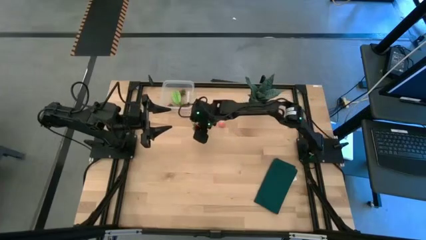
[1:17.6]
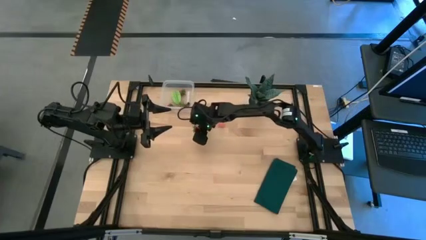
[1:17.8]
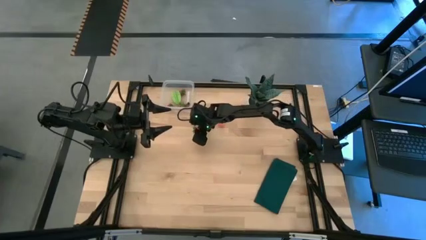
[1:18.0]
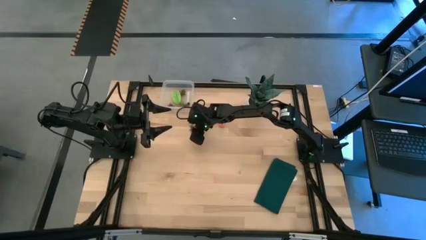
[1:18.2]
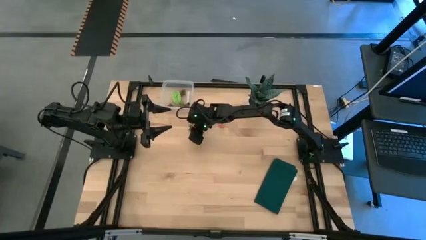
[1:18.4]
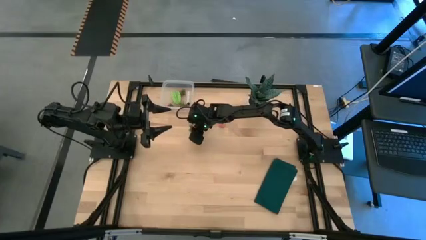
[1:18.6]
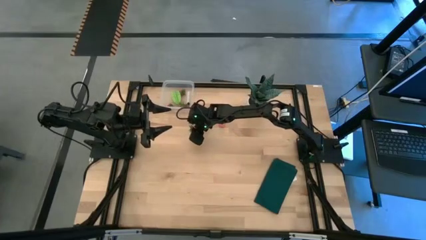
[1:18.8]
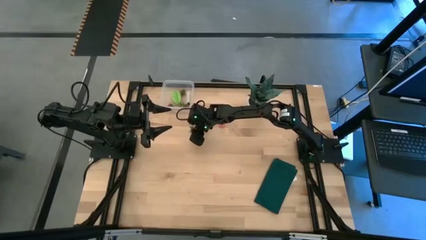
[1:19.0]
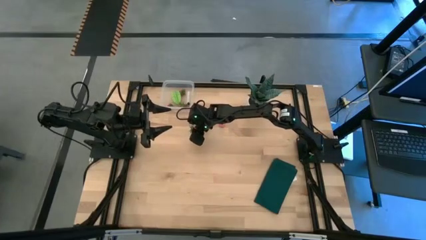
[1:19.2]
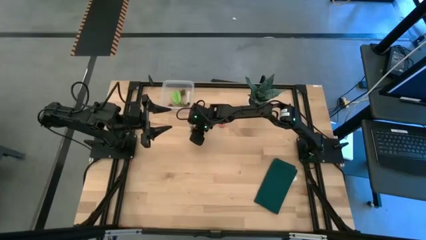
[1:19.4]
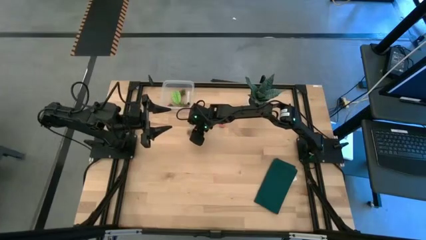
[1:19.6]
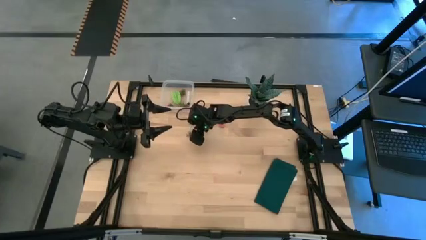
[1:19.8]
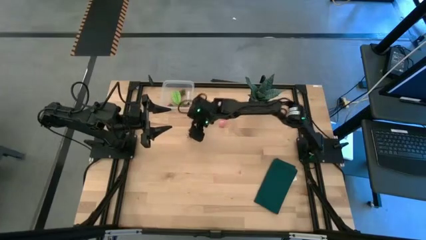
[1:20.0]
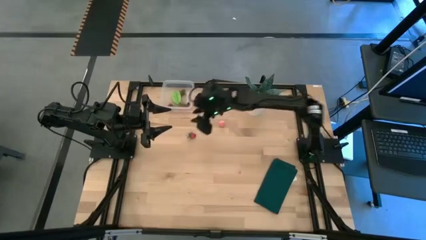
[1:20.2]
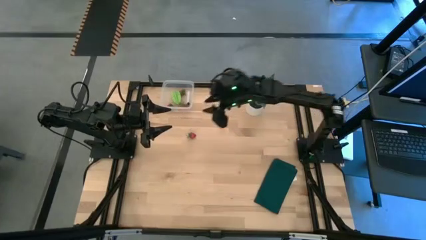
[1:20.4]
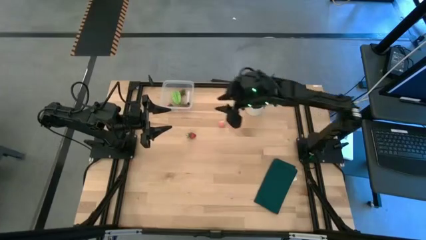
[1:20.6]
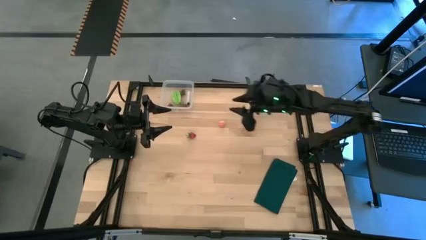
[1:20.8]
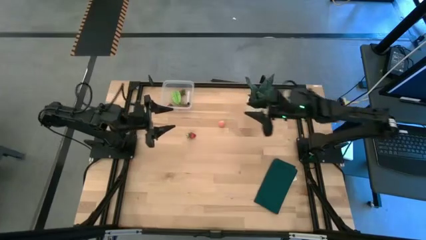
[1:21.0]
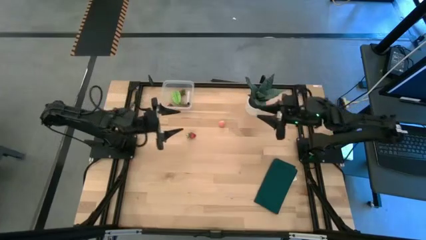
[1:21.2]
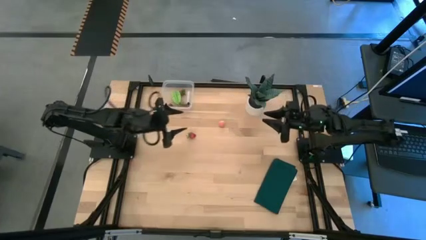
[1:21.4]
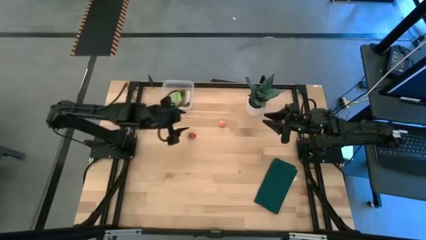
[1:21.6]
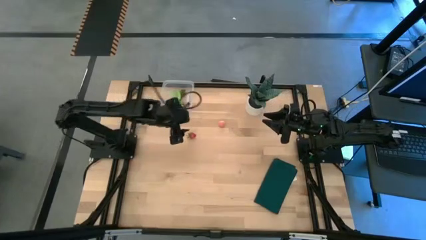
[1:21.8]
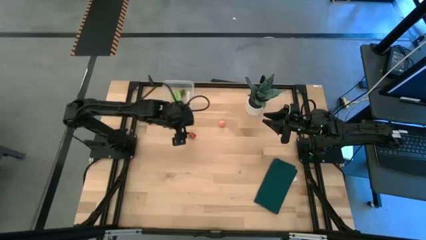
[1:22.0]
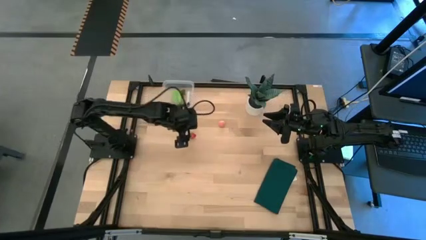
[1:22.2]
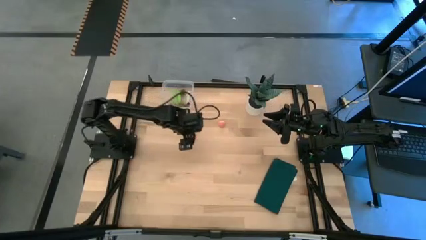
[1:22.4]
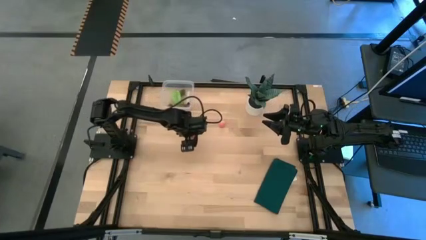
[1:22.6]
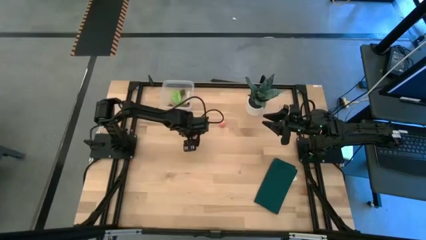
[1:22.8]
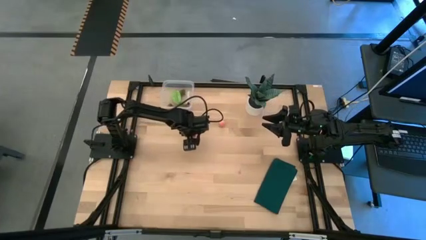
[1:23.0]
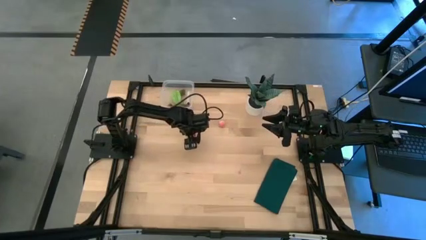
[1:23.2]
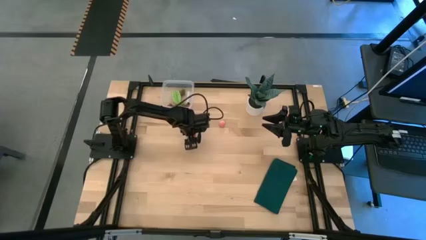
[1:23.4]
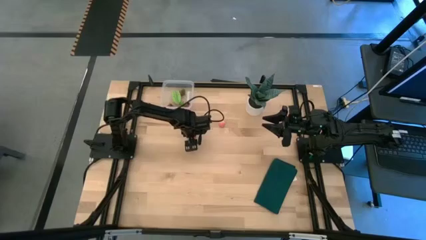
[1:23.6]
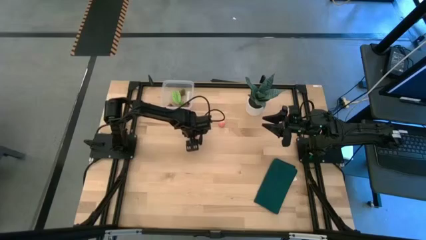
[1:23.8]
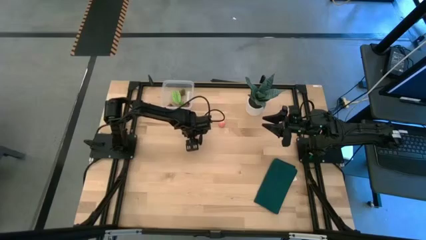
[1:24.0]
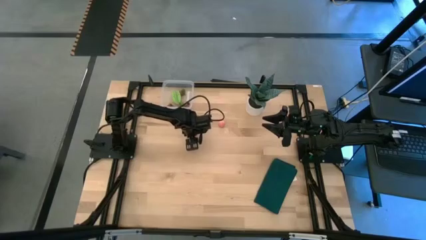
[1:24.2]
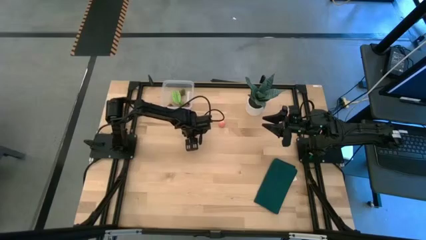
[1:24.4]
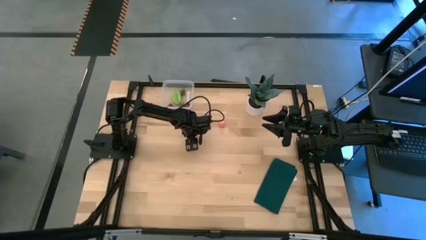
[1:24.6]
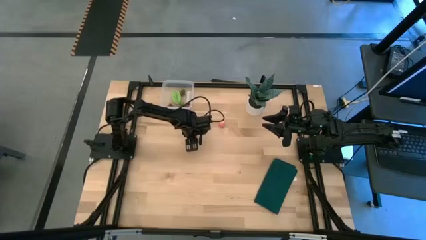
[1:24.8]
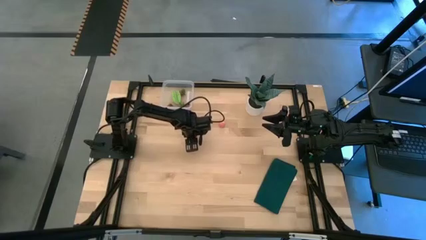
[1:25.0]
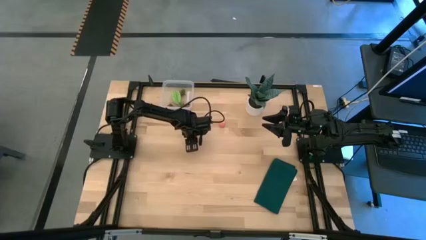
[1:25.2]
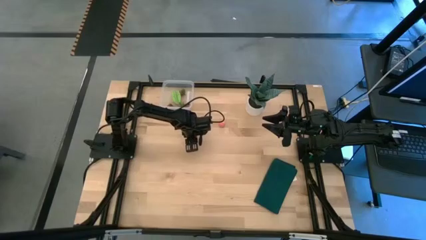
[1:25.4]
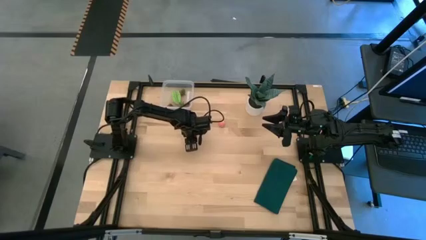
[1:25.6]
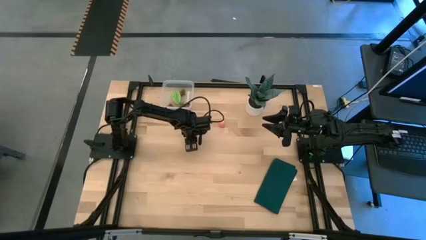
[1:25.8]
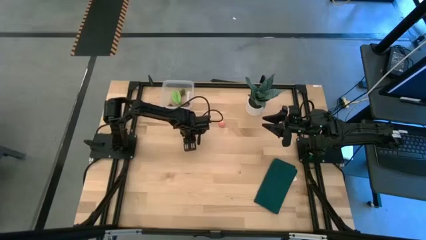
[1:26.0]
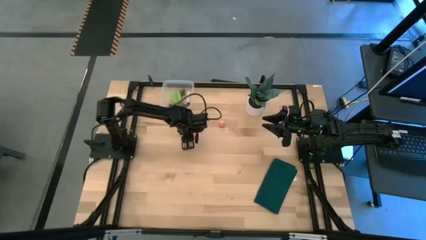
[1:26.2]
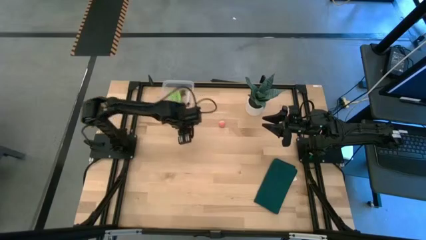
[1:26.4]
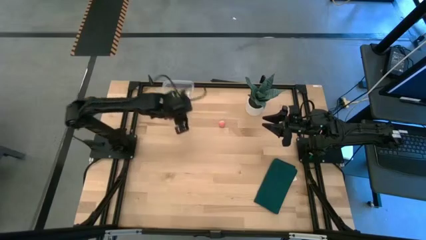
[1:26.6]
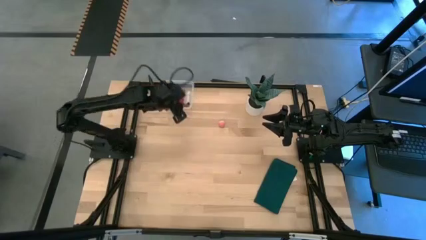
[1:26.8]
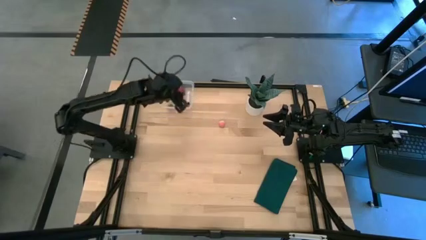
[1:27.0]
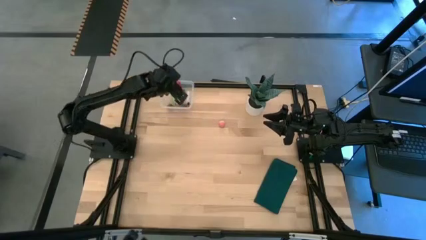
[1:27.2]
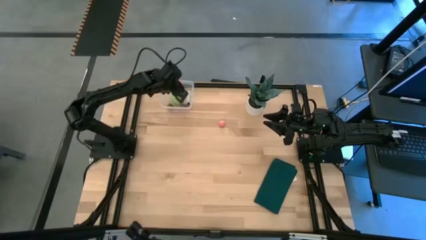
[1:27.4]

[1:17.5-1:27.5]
Task: Pick and placing Produce into tupperware
Put the red strawberry into the transparent container

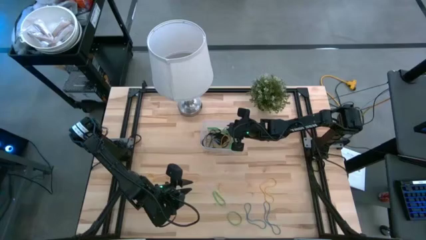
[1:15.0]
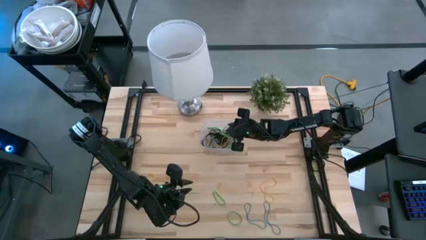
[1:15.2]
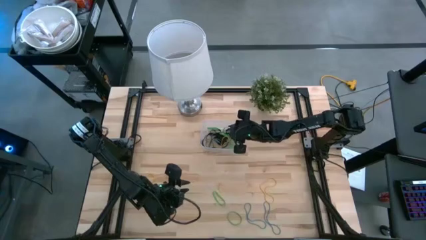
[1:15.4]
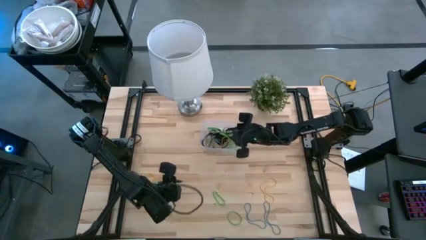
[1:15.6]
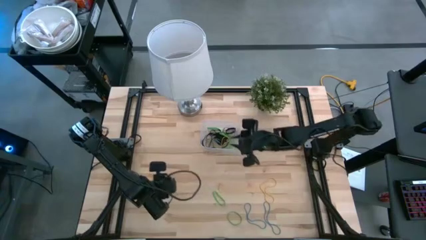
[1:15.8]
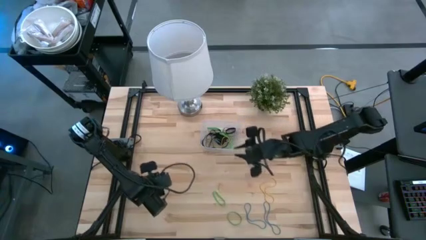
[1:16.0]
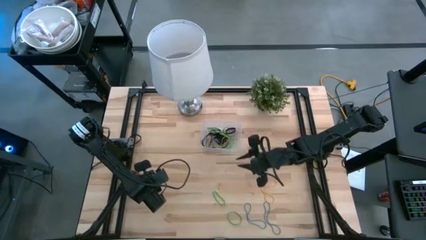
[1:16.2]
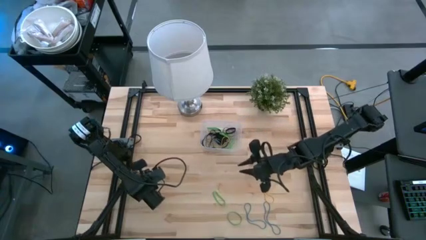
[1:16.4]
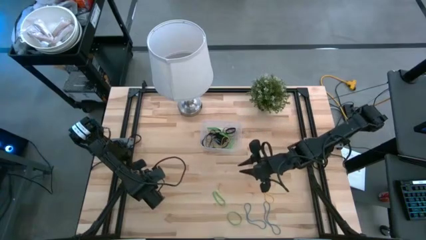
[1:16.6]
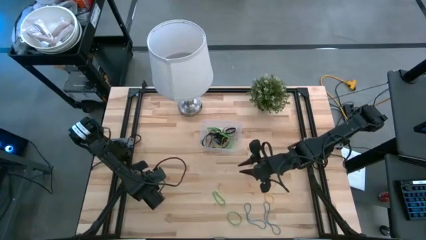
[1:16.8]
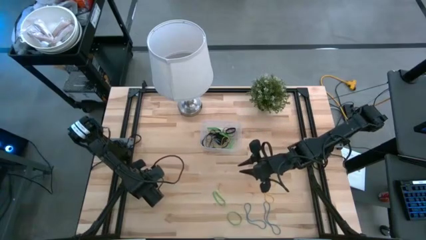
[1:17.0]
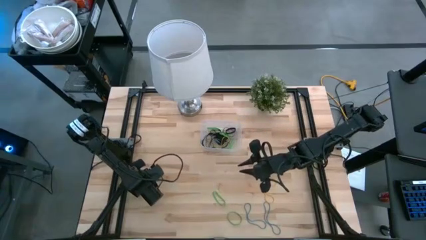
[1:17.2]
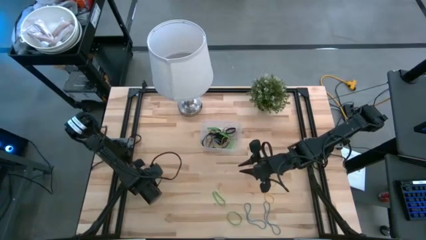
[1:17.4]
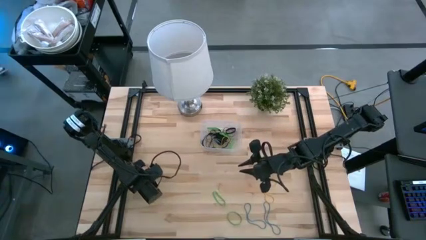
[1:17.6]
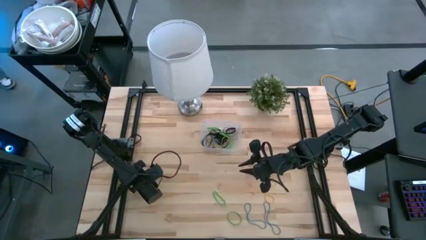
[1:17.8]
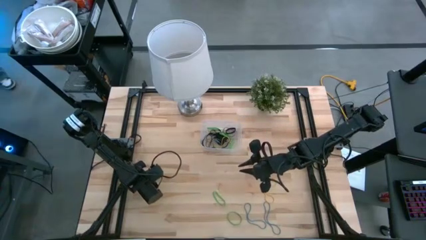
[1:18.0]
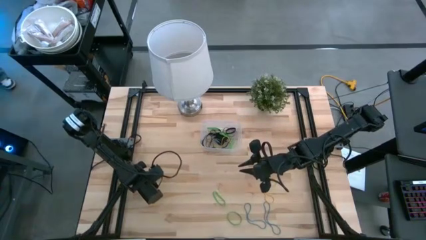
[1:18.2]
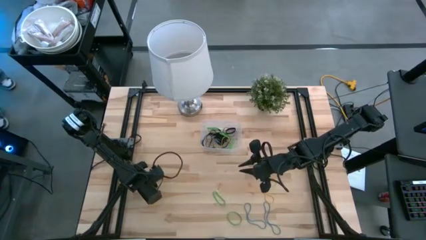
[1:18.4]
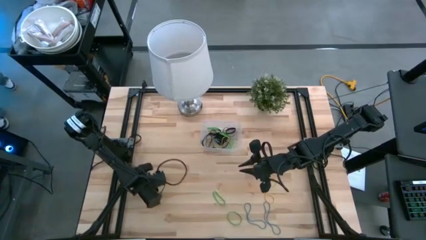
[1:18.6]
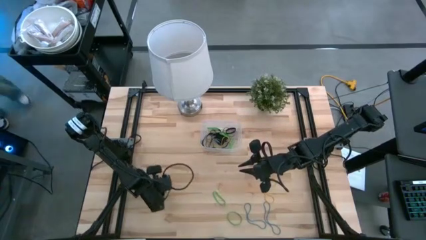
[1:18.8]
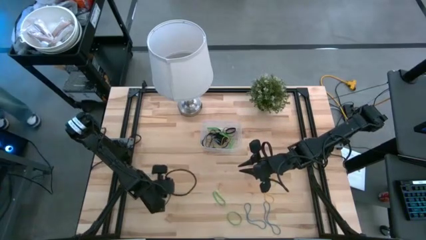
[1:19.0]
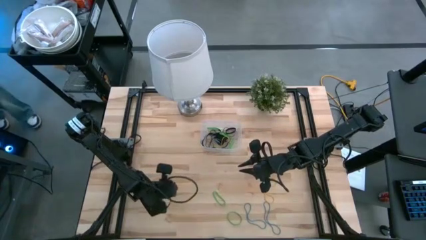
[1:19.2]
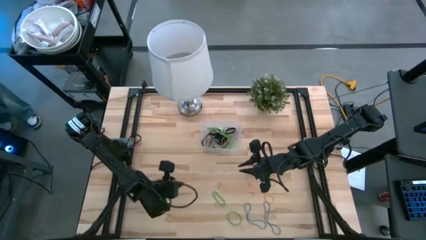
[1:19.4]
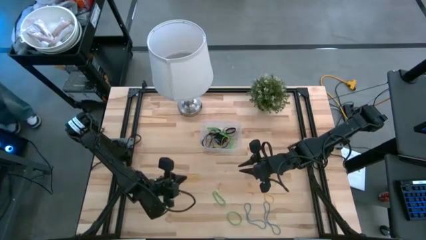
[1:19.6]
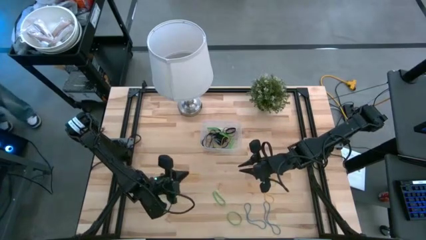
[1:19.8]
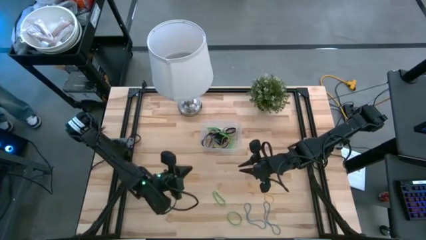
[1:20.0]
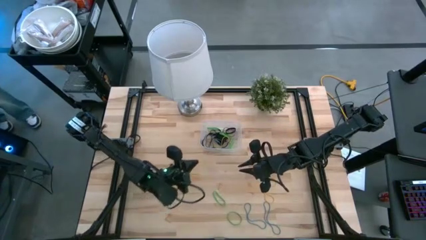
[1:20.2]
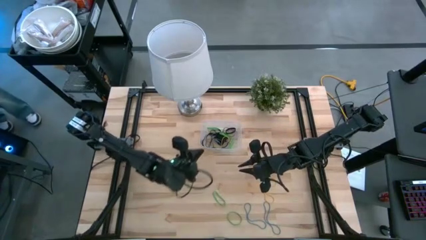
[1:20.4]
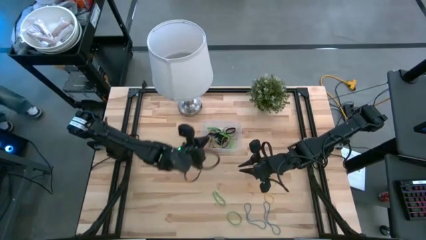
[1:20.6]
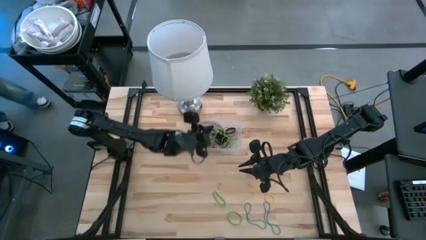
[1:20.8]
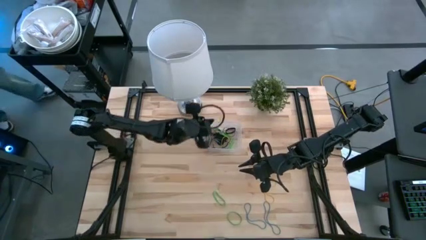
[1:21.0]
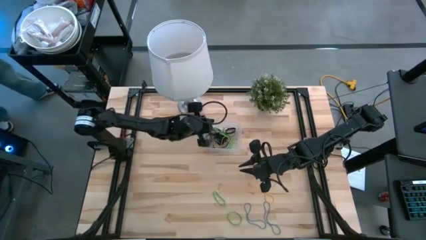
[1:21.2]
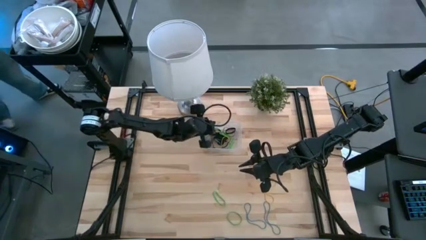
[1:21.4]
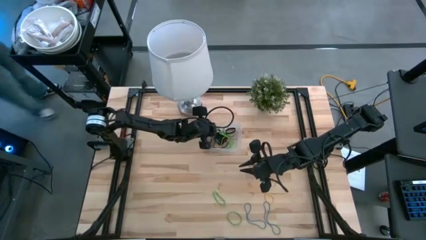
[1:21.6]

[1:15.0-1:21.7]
Task: Pick and place rubber bands into bin
Put the yellow rubber band into the transparent bin
